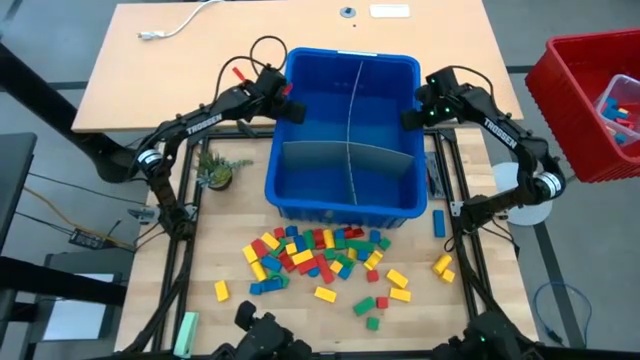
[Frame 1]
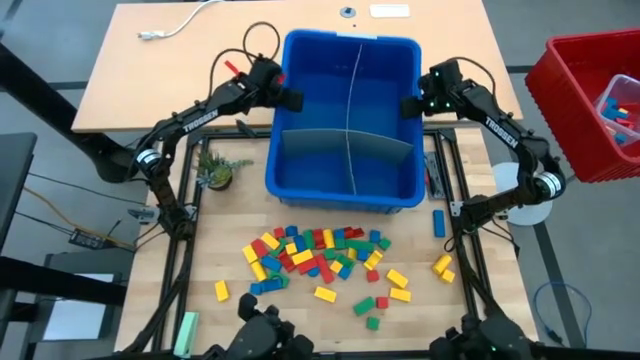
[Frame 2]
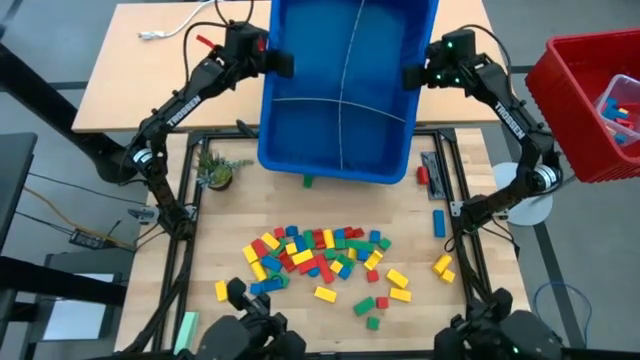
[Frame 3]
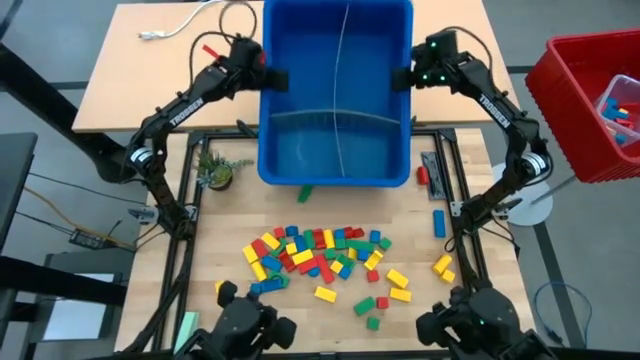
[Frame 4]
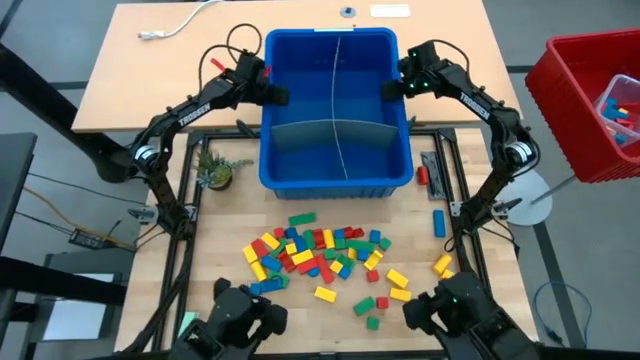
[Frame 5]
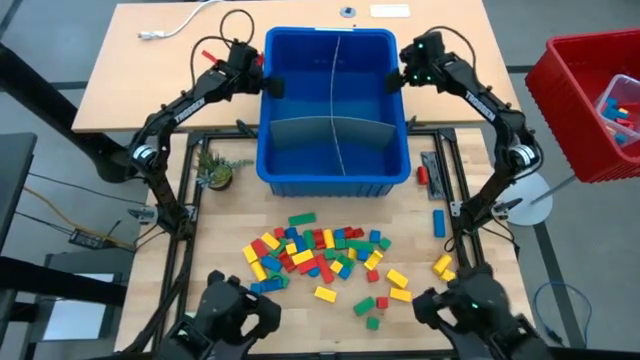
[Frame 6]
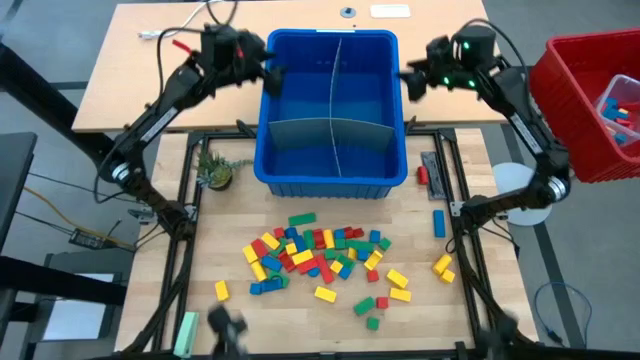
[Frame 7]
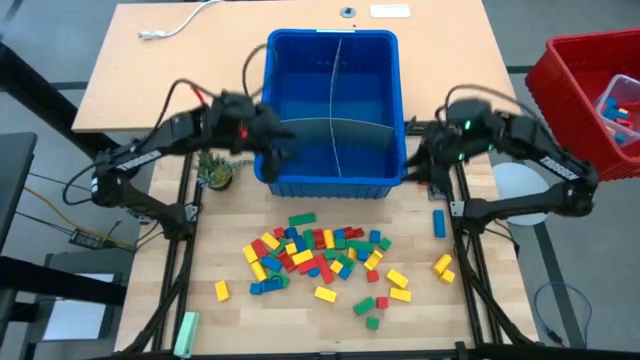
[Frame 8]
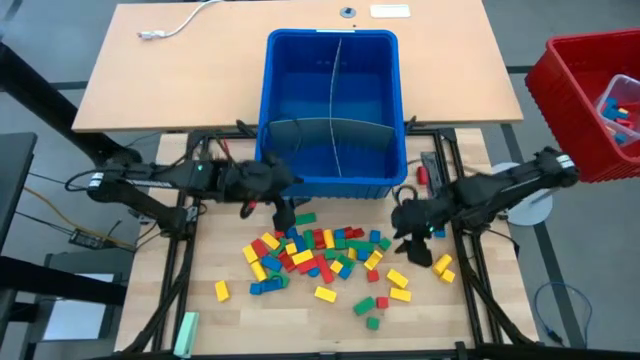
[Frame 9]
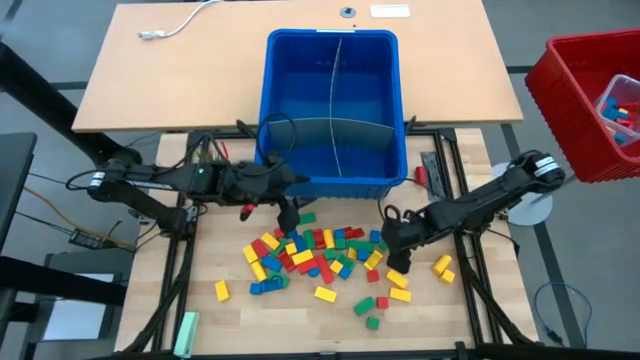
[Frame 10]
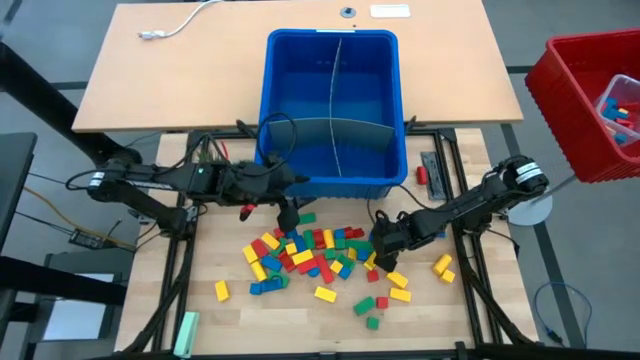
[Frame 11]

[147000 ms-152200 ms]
Task: Sort blocks
Adjust the blue bin

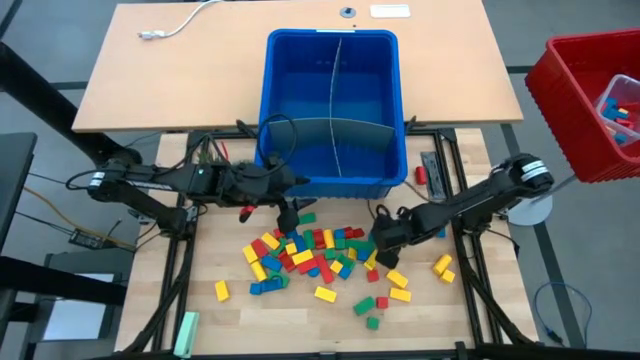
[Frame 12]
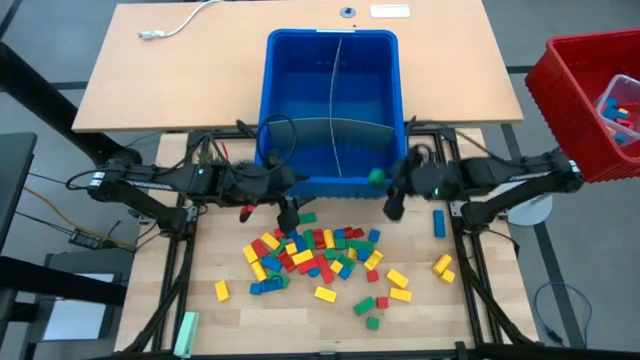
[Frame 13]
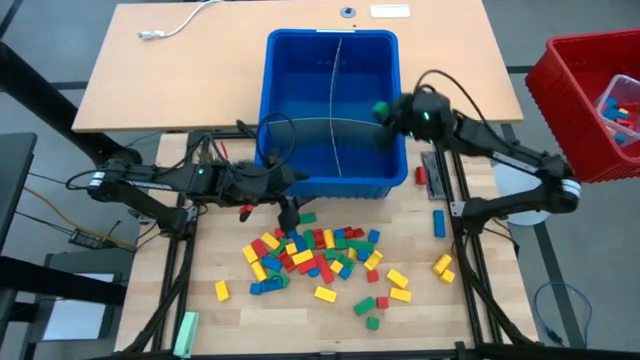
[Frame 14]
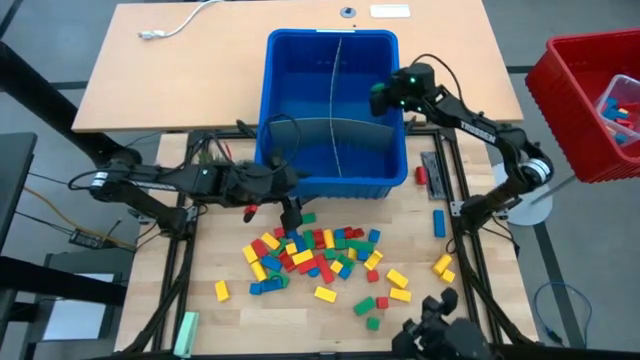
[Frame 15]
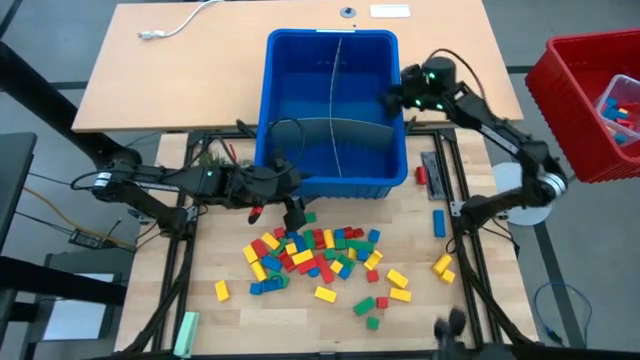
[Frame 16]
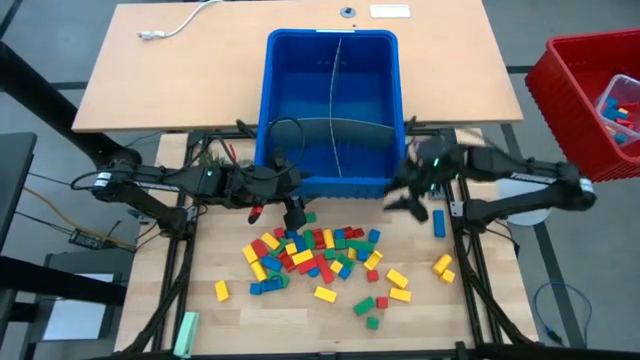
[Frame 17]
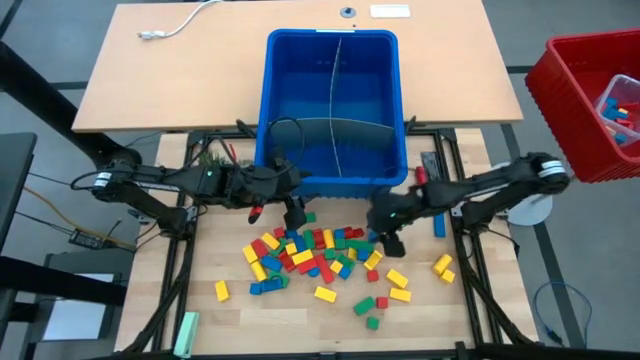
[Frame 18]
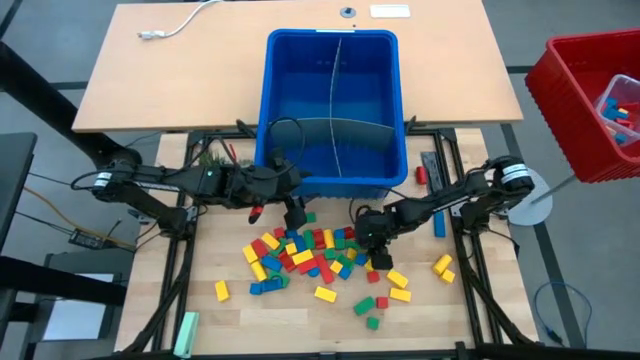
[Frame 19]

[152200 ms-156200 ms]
Put the green block into the blue bin

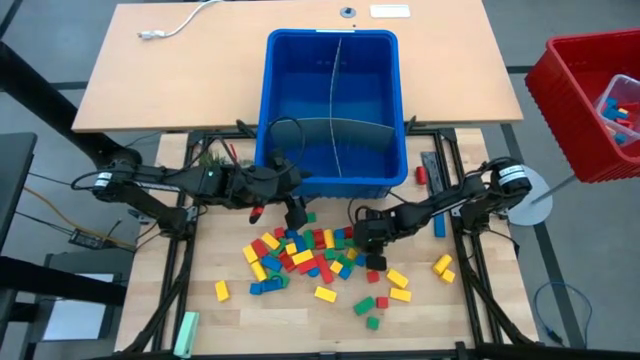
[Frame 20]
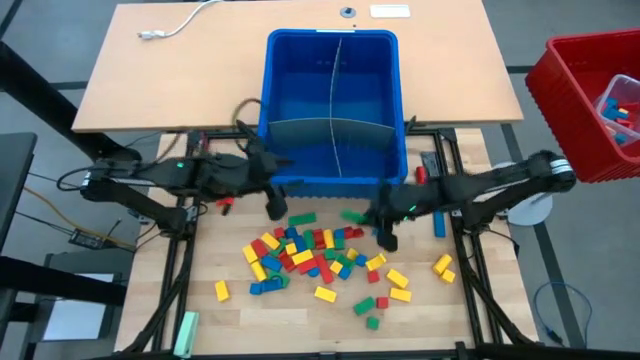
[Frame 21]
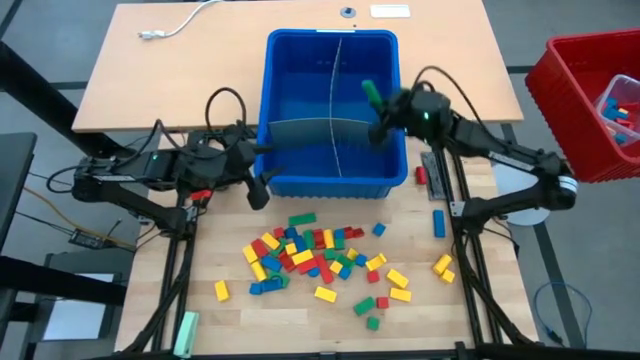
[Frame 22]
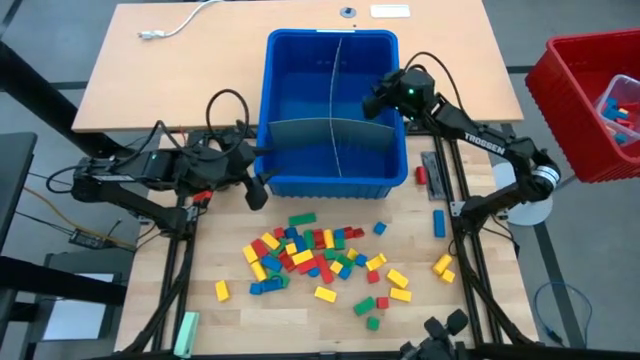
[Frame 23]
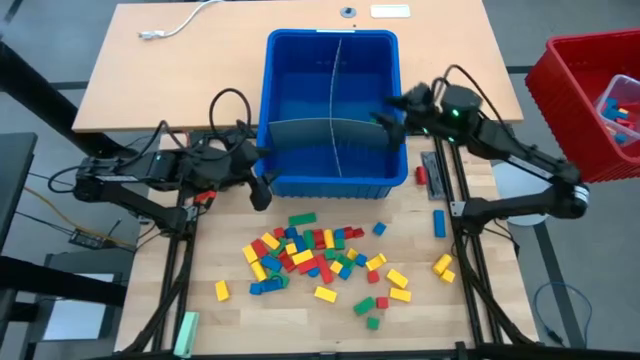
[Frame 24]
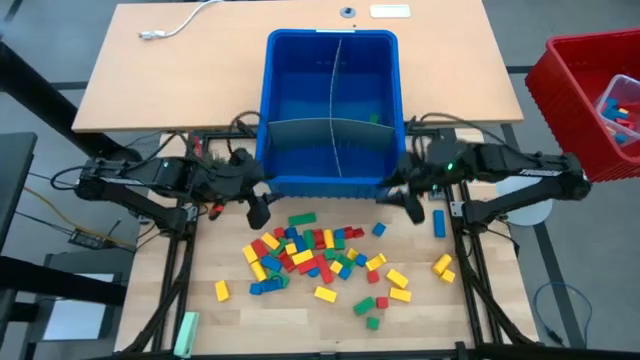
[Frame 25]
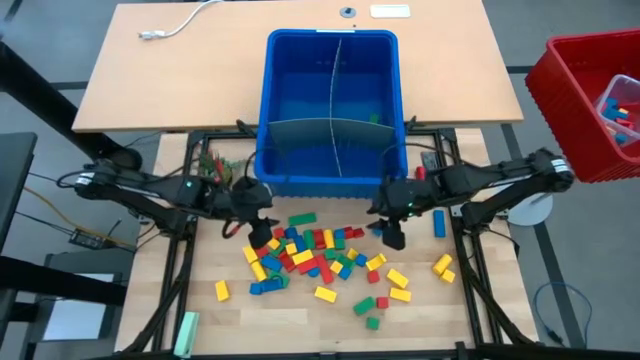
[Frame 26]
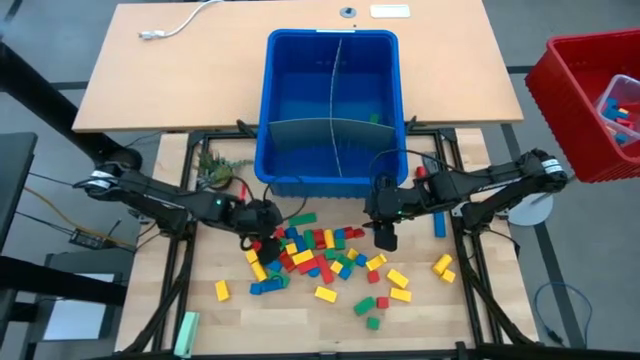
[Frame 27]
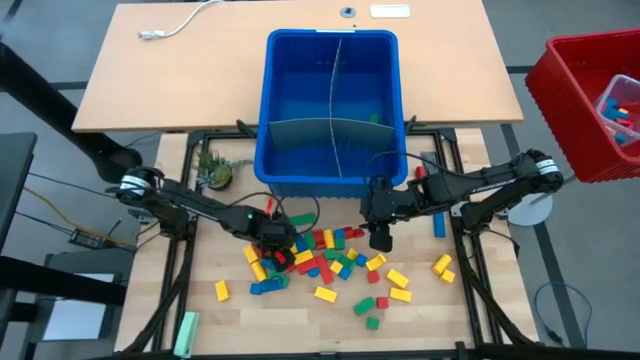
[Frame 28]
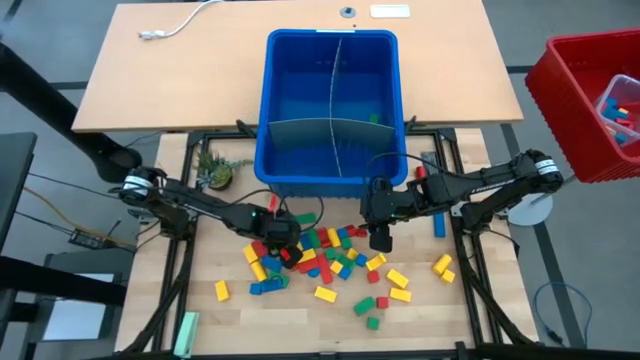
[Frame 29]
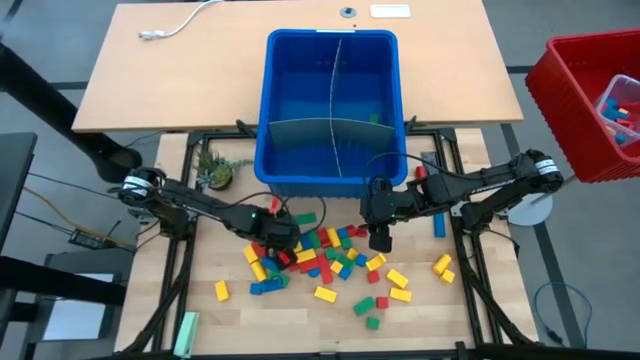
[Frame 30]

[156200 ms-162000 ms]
Put the green block with the other green blocks into the blue bin

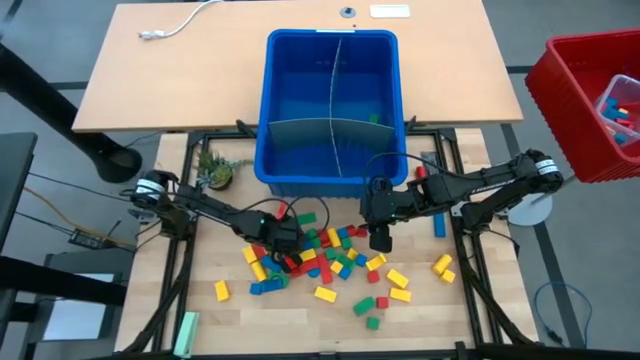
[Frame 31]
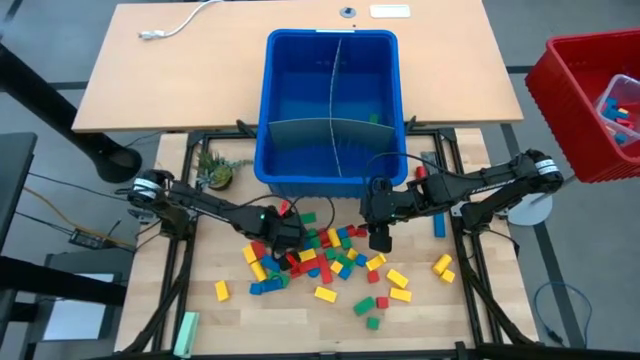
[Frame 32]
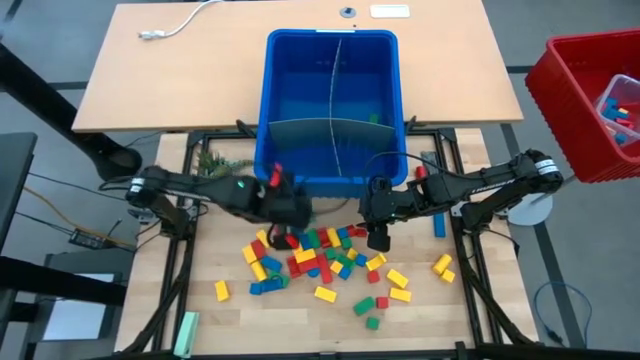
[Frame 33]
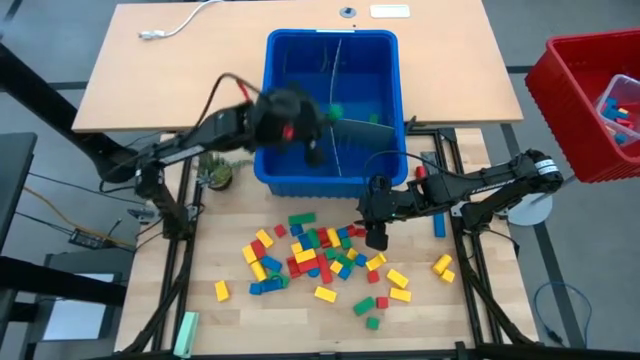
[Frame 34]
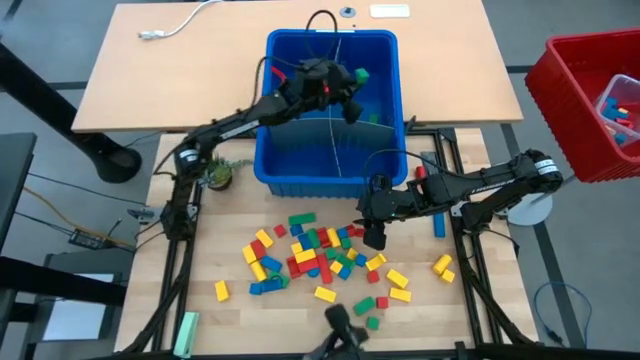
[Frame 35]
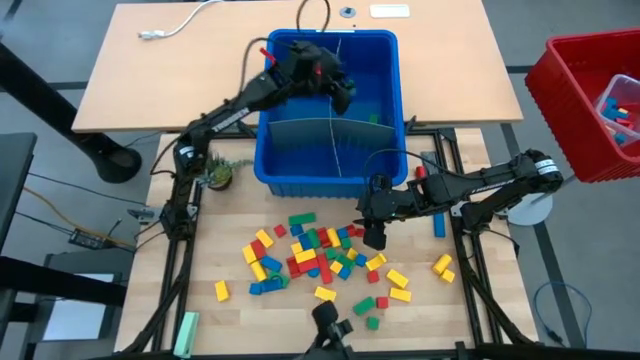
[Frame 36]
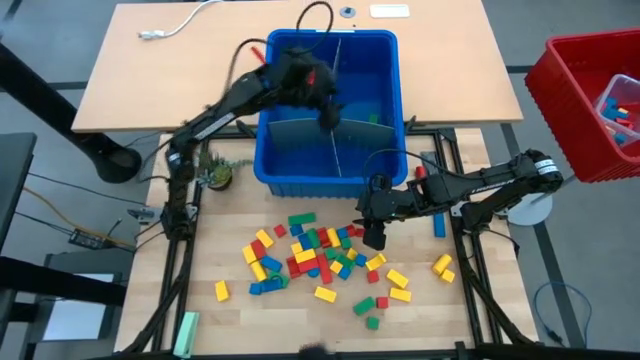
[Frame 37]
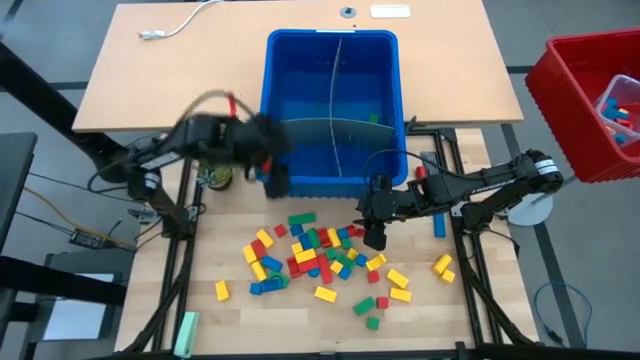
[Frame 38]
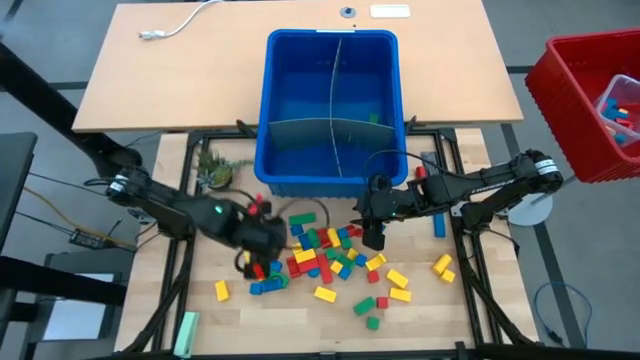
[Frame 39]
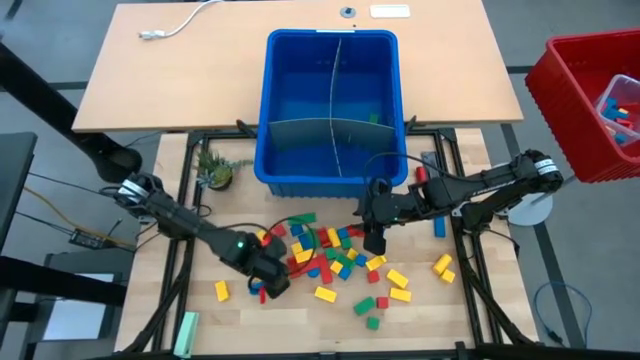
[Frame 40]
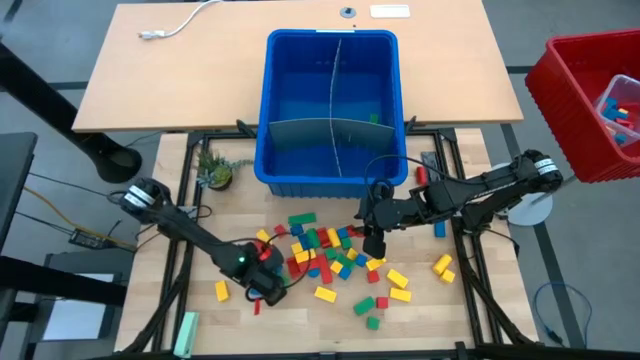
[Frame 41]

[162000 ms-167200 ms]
Put the green block with the other green blocks into the blue bin
